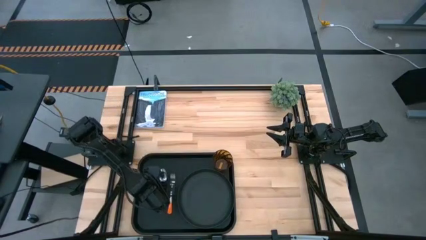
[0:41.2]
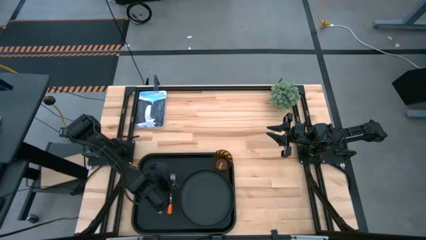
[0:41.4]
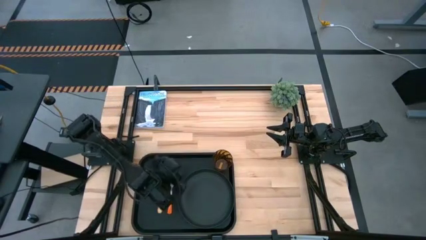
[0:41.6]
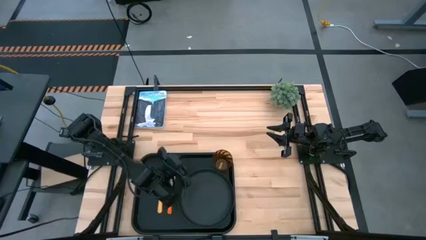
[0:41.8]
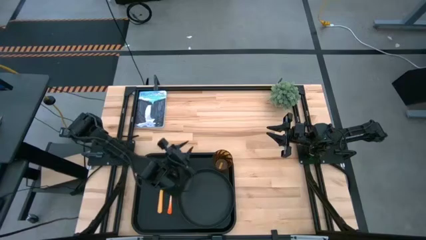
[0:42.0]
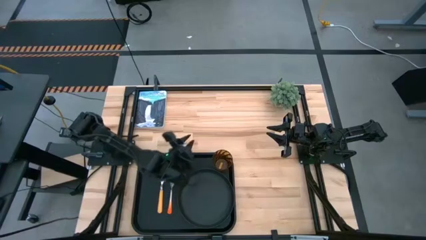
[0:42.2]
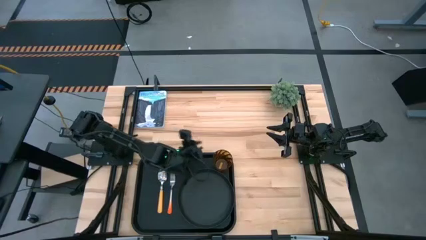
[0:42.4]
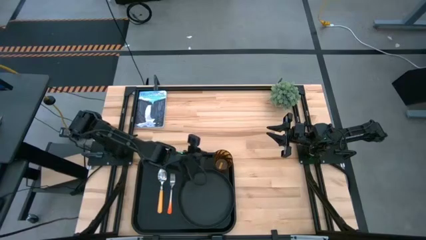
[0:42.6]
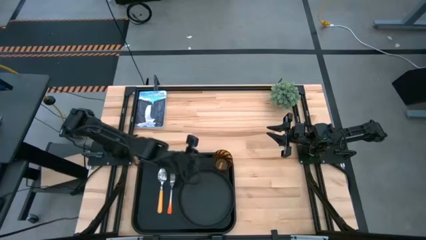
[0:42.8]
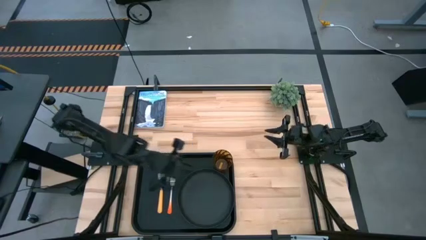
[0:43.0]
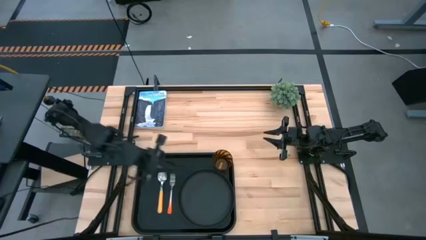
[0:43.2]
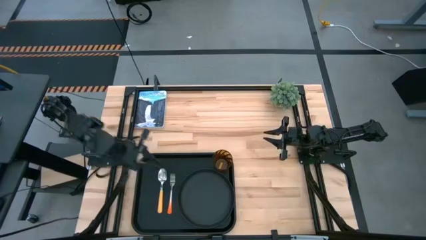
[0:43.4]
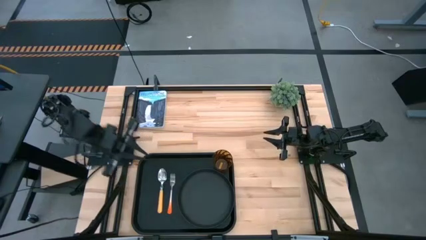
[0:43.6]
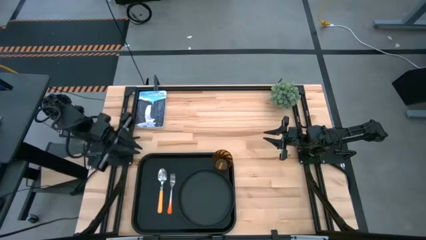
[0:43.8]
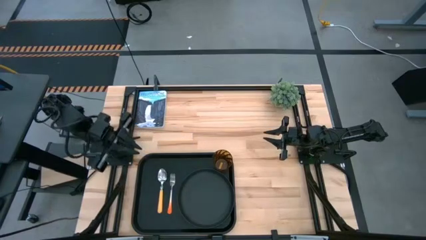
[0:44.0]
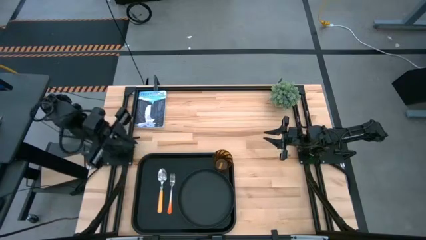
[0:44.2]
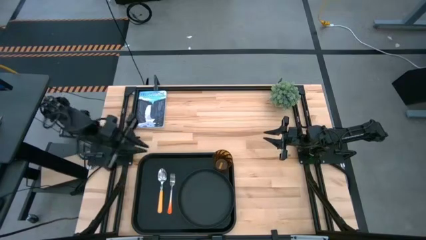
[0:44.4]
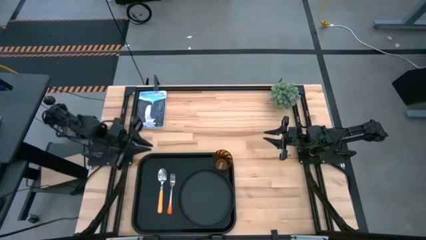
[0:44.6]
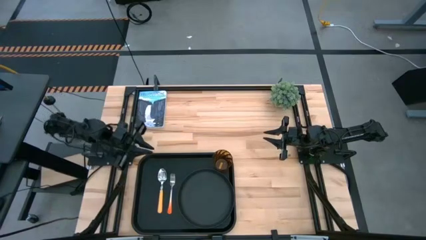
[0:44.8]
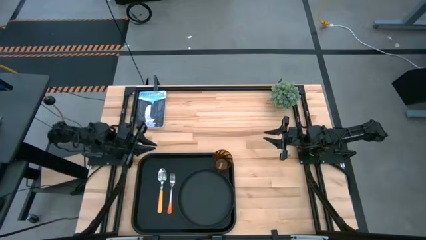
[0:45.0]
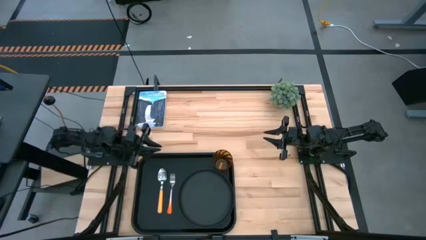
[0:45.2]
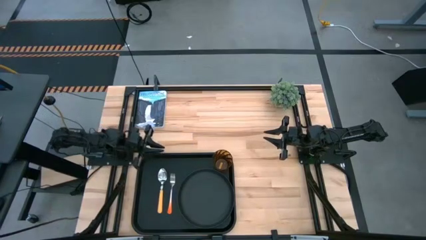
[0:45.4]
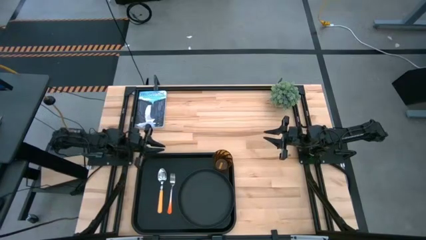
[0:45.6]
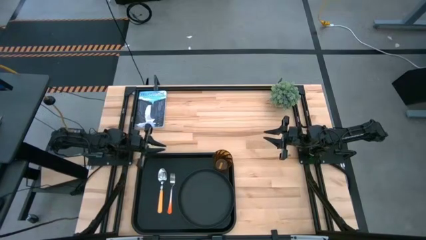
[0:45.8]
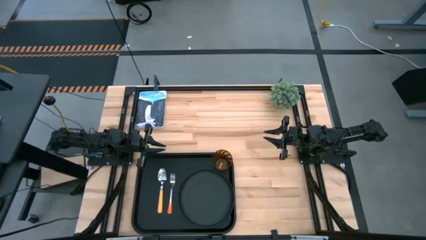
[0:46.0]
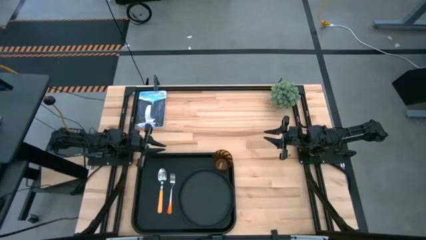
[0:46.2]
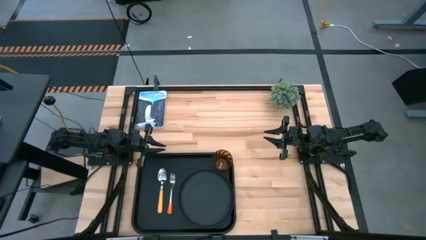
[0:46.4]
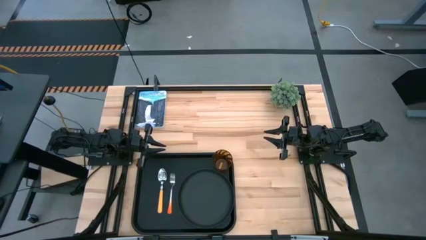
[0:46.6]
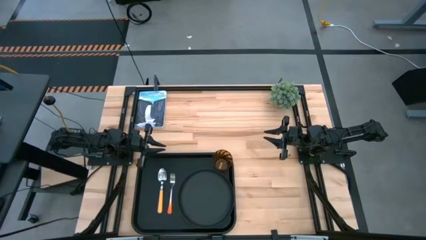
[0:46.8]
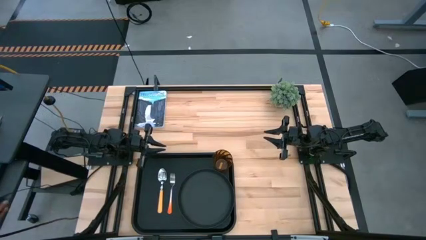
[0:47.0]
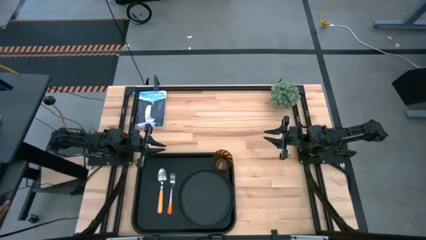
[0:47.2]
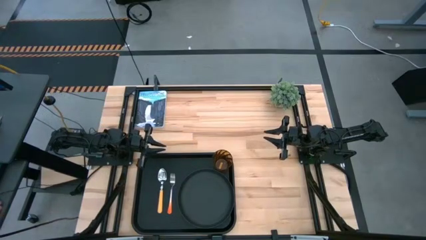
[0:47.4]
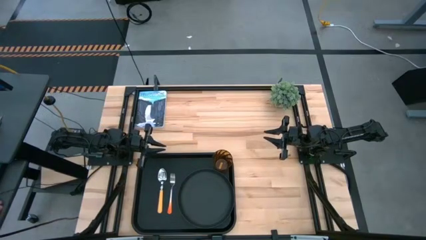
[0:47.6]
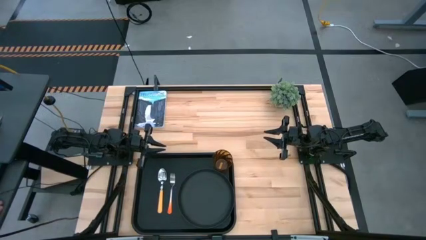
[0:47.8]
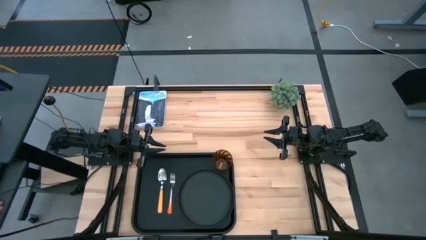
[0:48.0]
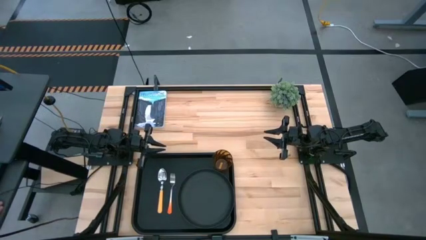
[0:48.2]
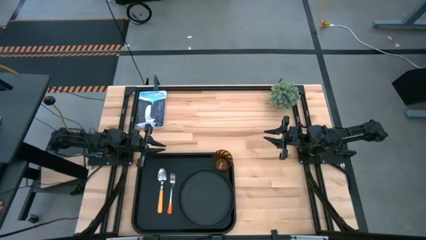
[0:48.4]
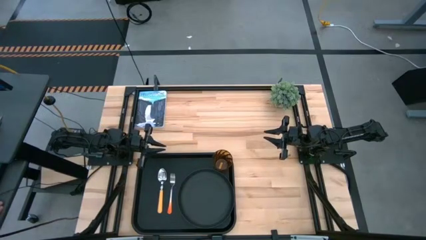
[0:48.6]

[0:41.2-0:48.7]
Task: Pick and place plate/cup/fork/spoon on tray
Return to Home Position

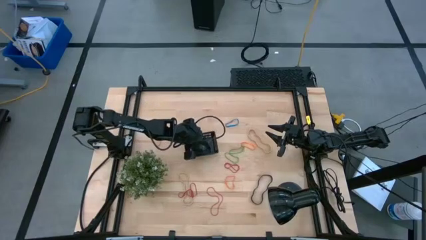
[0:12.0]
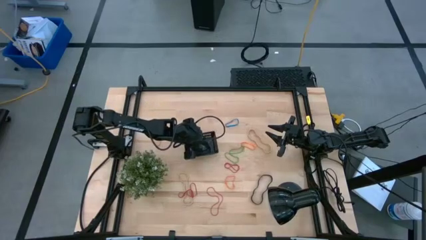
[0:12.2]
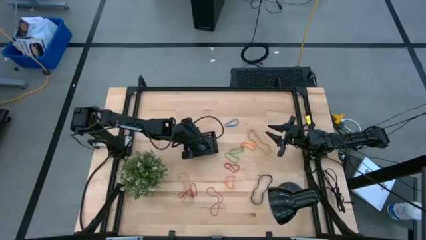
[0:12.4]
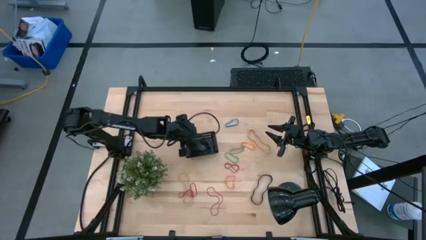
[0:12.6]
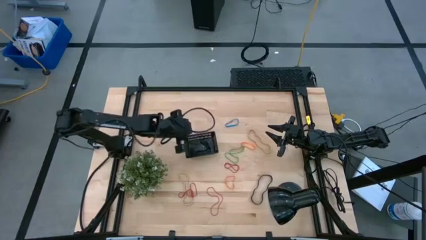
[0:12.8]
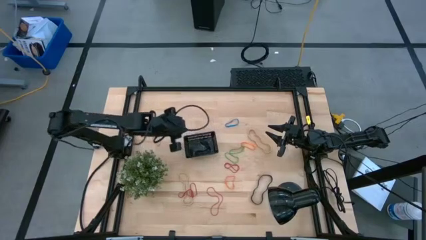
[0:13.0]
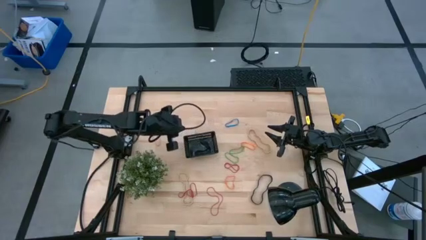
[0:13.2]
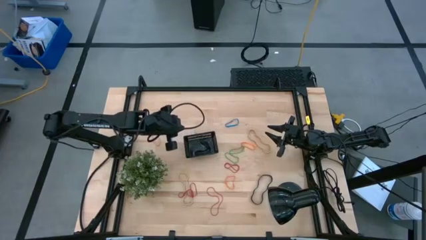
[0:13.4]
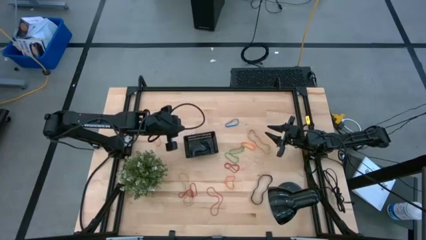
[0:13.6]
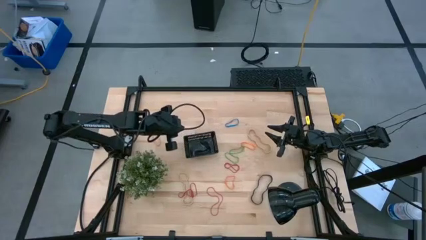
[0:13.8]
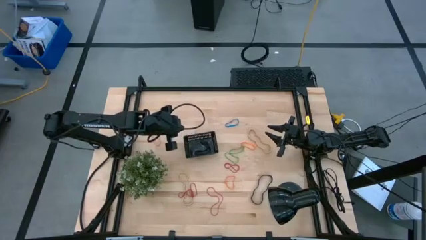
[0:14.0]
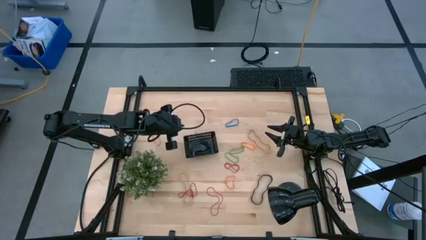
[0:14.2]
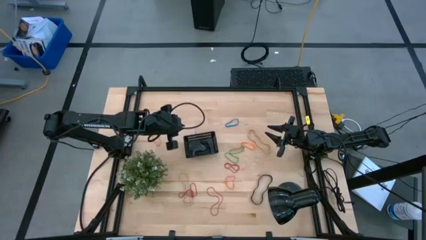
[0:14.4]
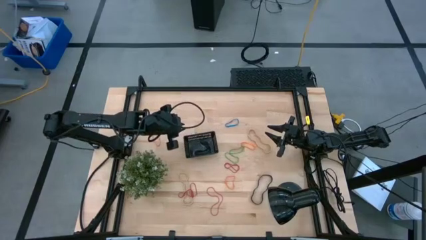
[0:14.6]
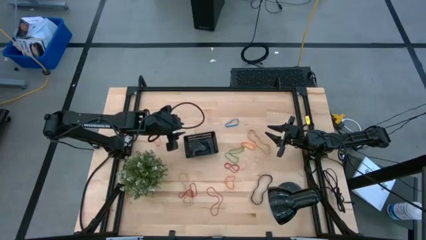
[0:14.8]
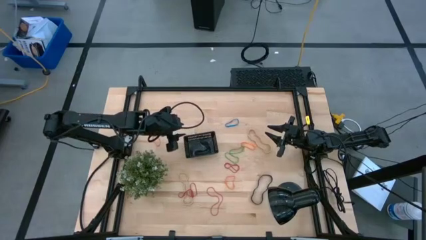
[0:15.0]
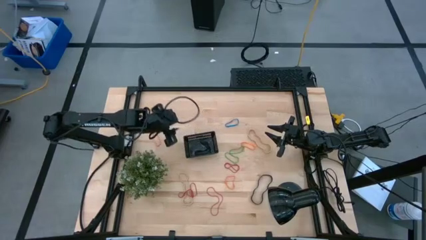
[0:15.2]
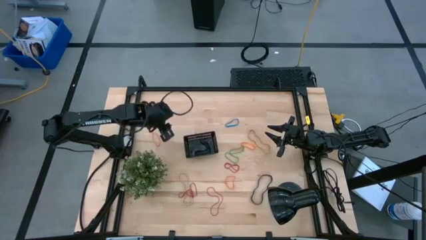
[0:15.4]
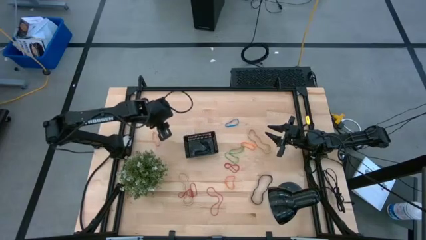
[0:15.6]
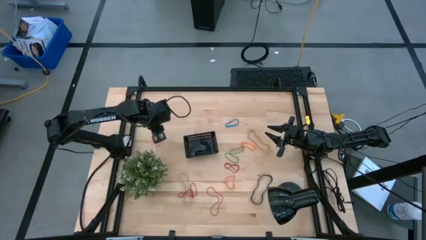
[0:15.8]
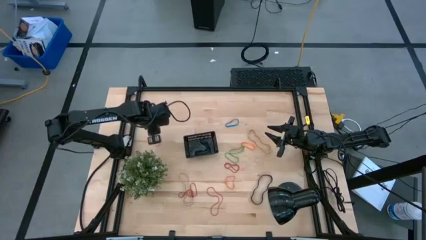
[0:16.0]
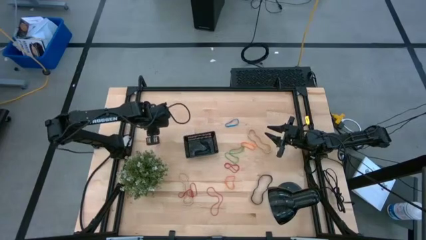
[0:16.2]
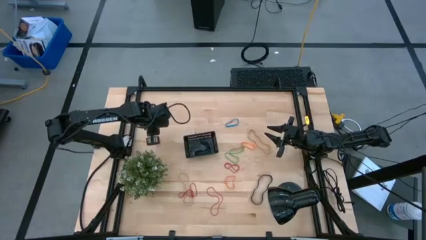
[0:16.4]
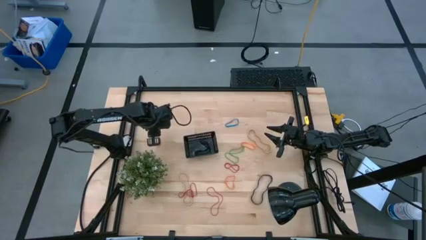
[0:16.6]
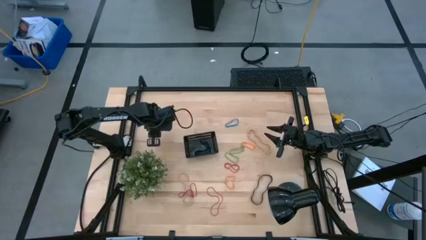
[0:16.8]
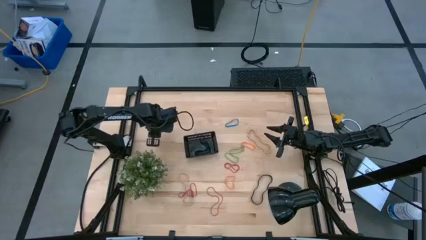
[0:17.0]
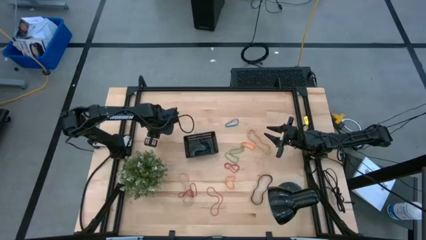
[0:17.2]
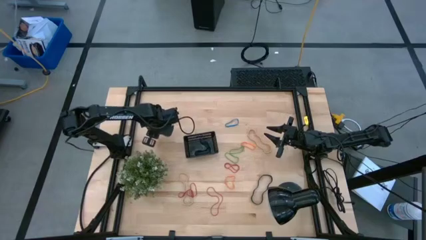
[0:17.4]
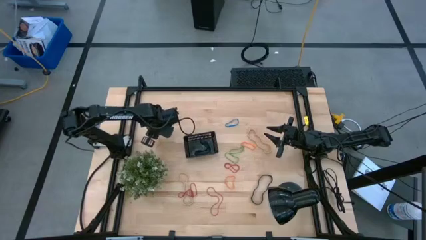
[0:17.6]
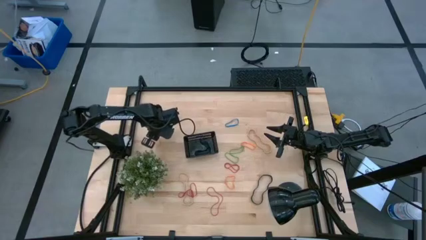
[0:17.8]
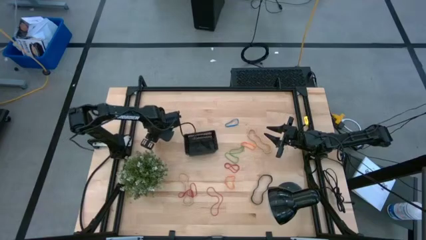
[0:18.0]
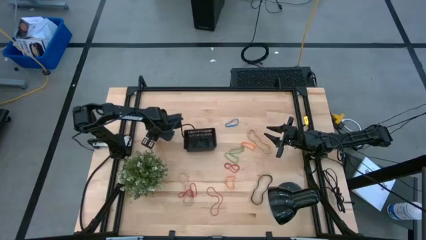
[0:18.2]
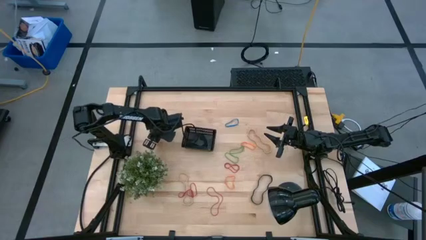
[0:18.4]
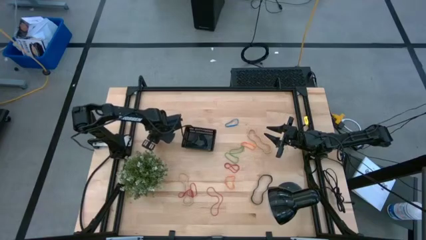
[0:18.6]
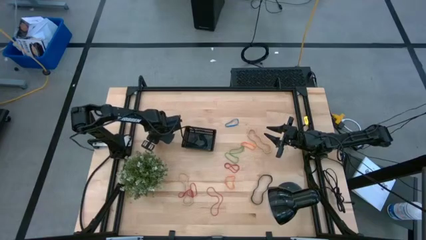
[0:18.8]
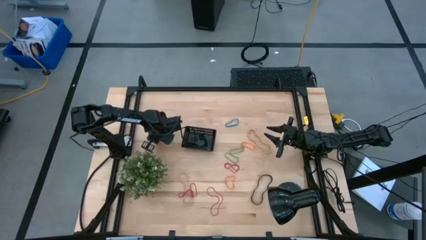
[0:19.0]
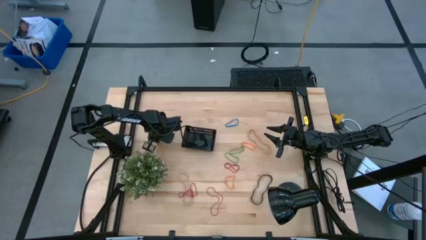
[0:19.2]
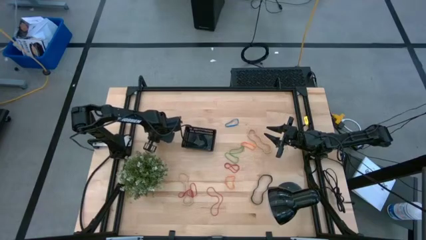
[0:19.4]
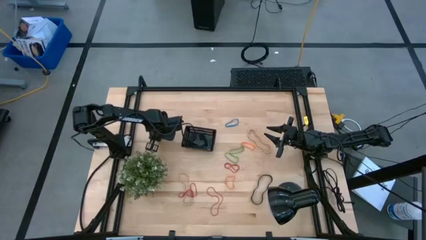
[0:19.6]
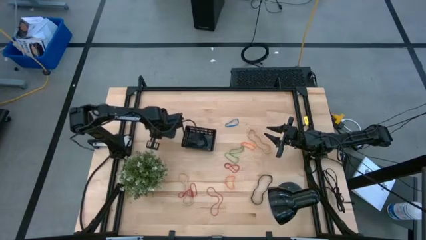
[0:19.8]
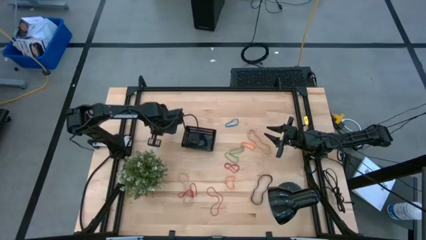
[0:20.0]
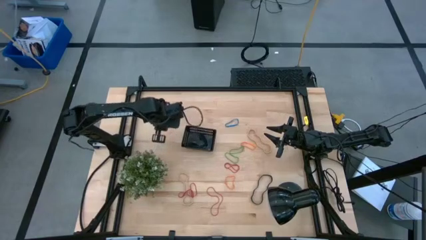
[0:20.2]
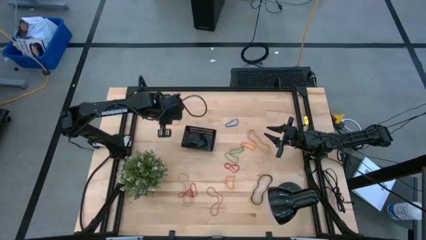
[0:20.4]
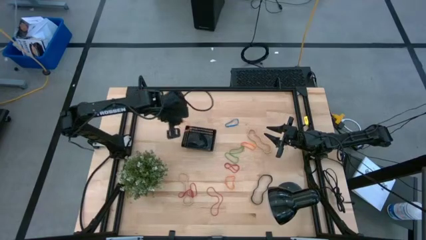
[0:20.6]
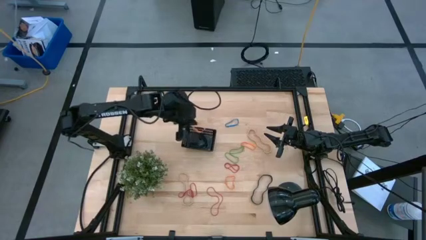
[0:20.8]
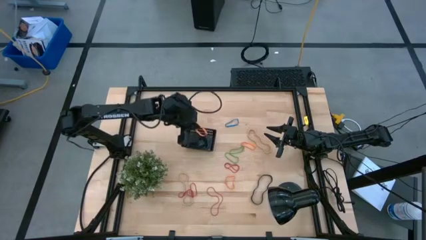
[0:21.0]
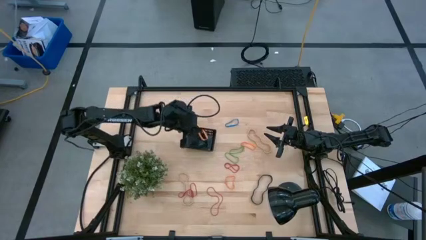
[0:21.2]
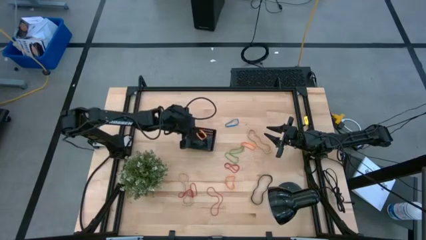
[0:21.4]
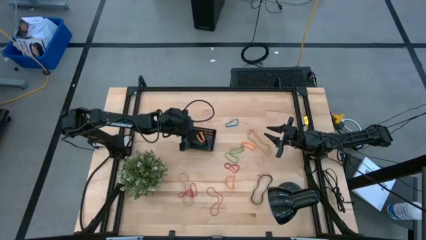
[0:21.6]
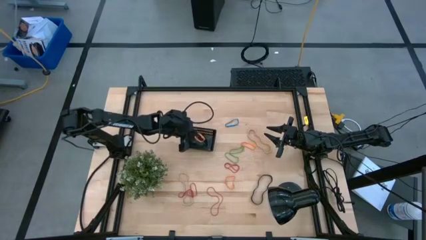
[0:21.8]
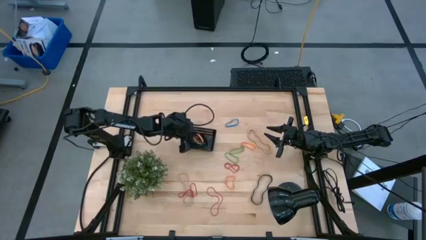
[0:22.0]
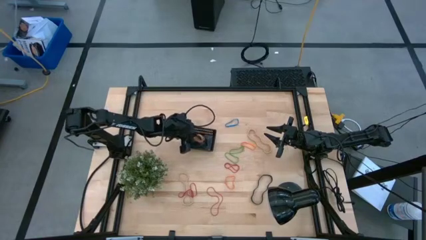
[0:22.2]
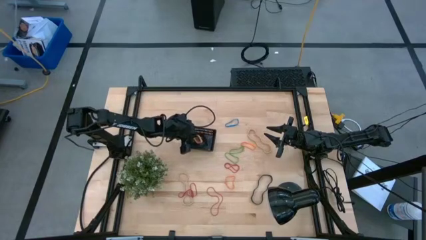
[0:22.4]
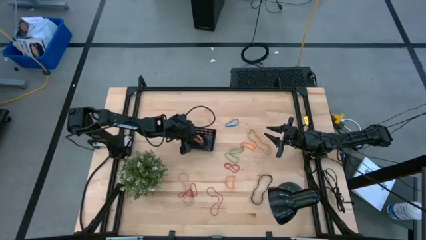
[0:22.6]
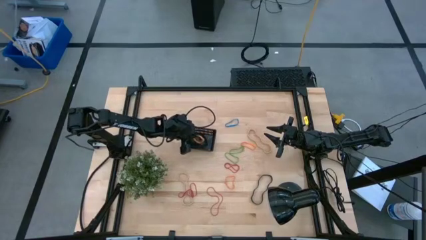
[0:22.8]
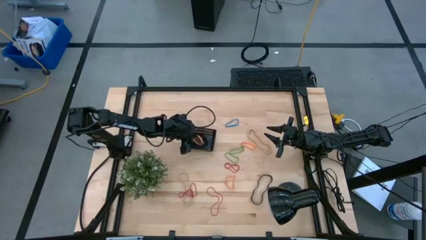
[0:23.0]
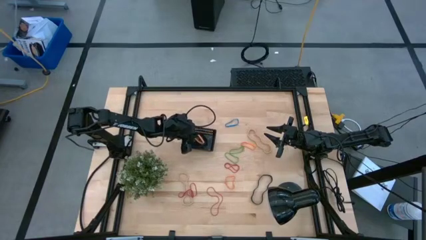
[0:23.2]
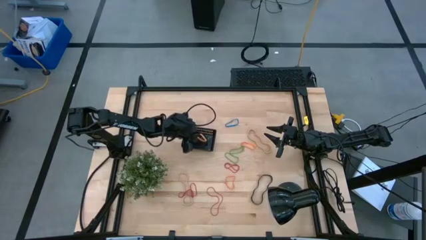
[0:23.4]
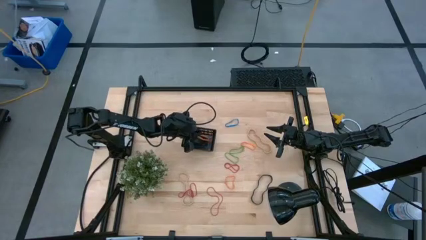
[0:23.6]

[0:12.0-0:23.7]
Task: Pick and place rubber bands into bin
Put the top left orange rubber band into the black bin
